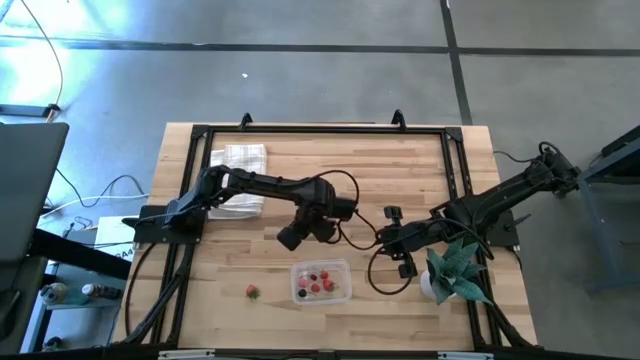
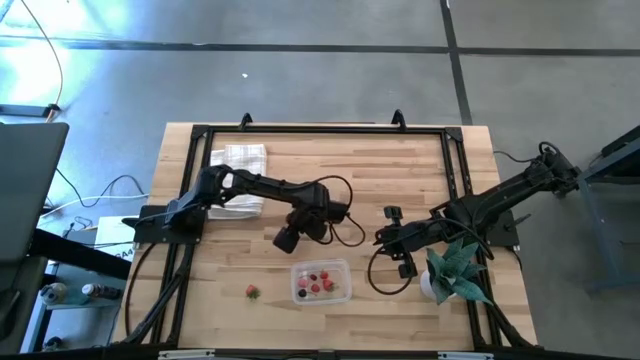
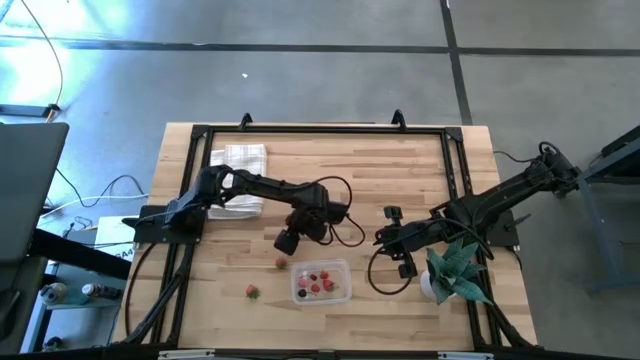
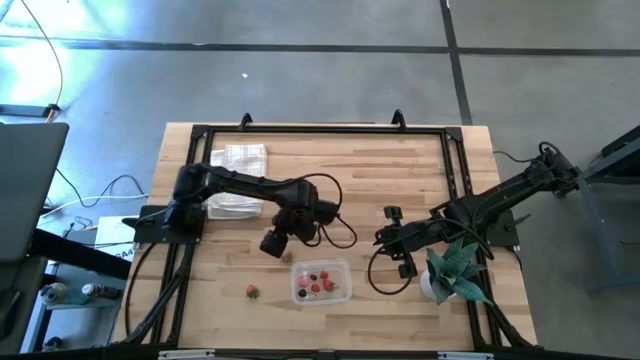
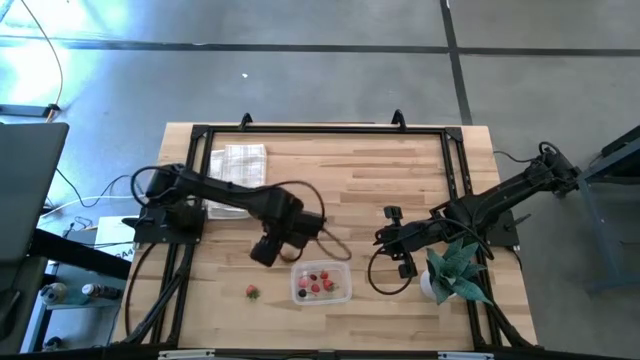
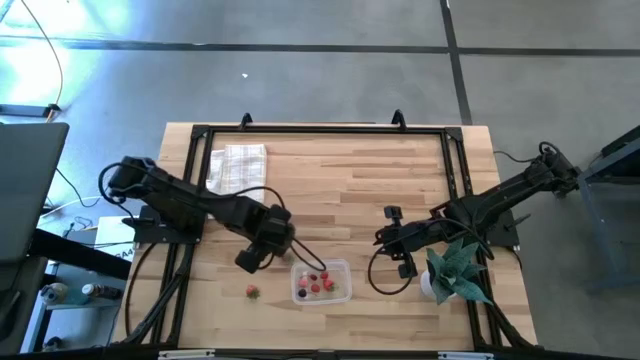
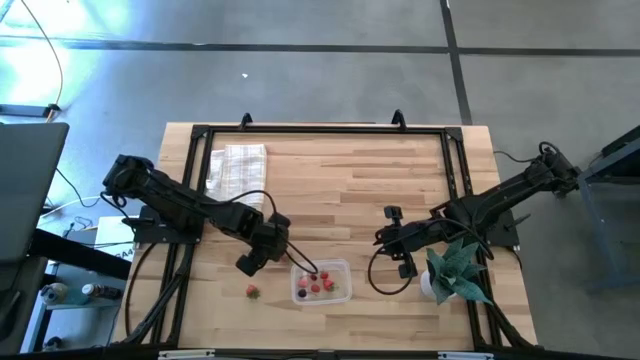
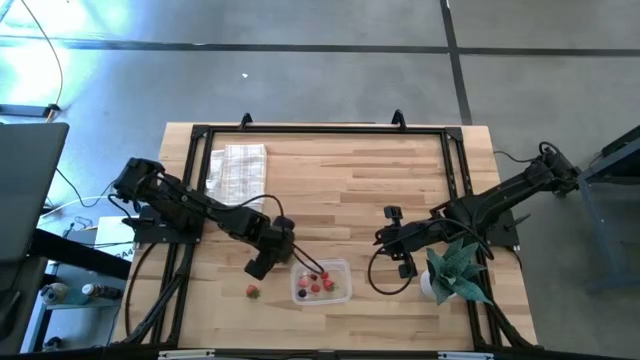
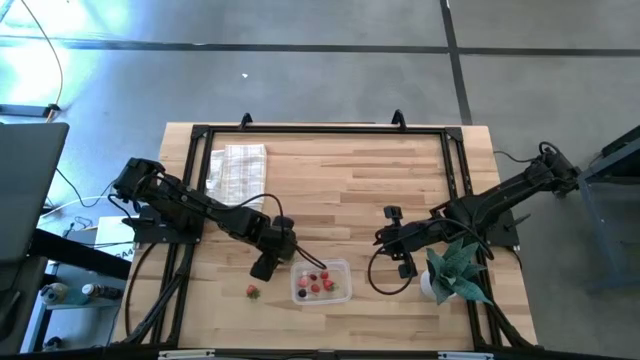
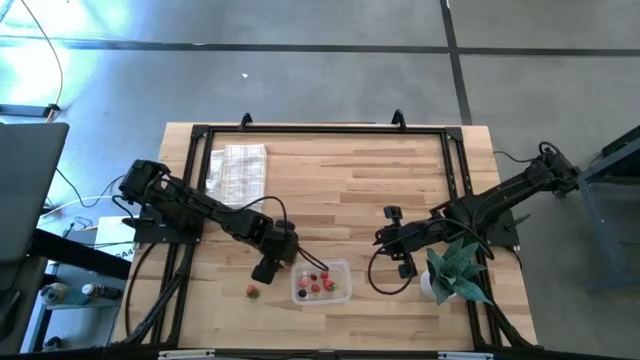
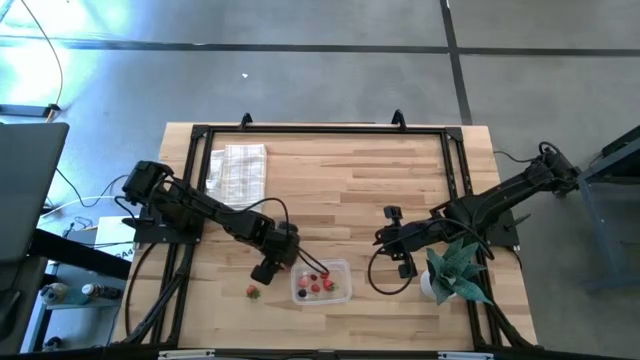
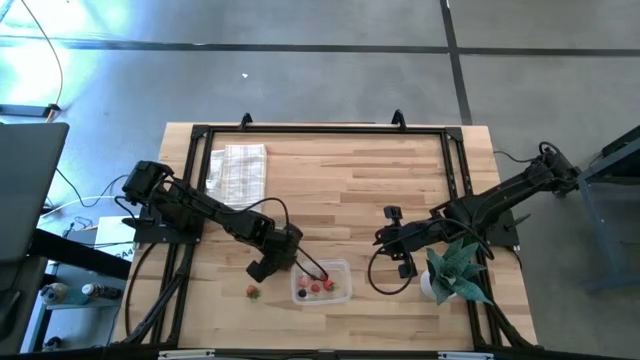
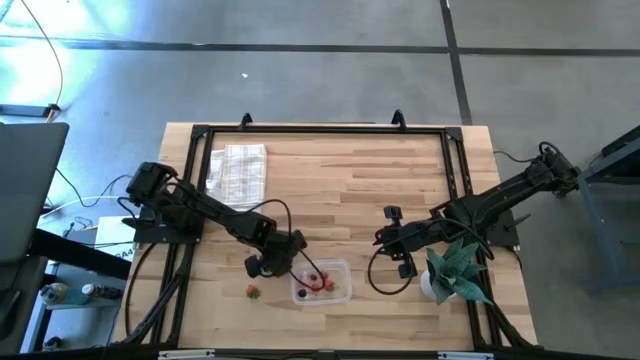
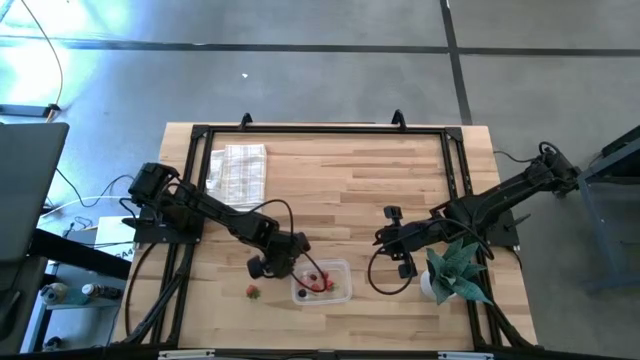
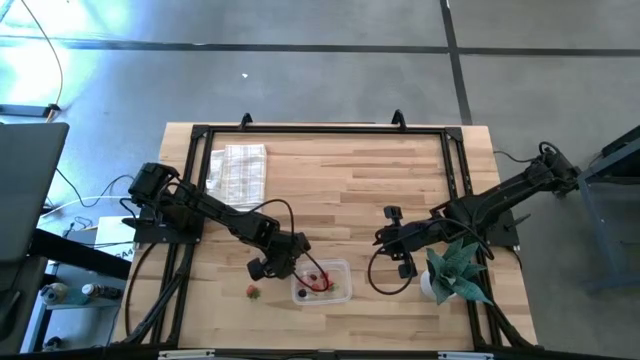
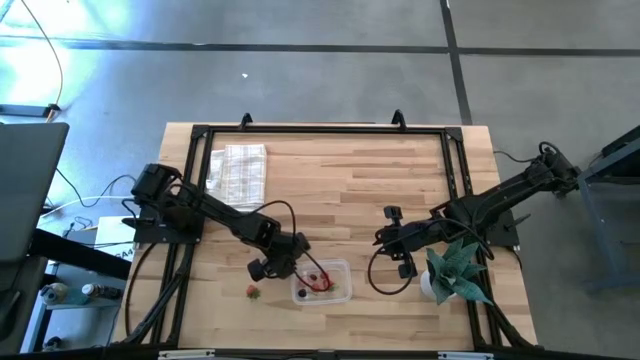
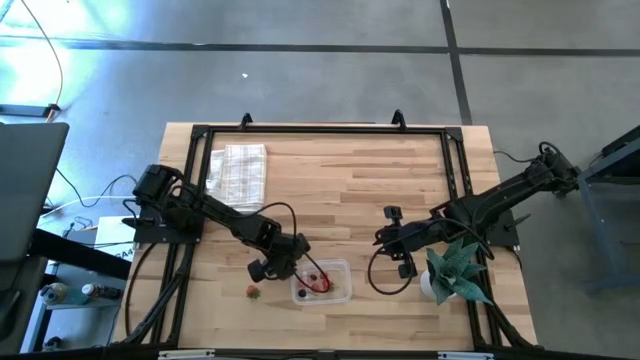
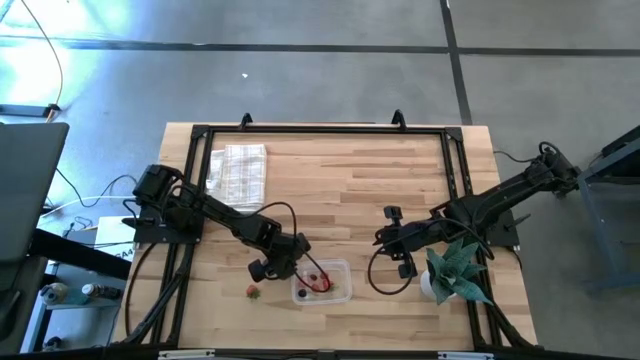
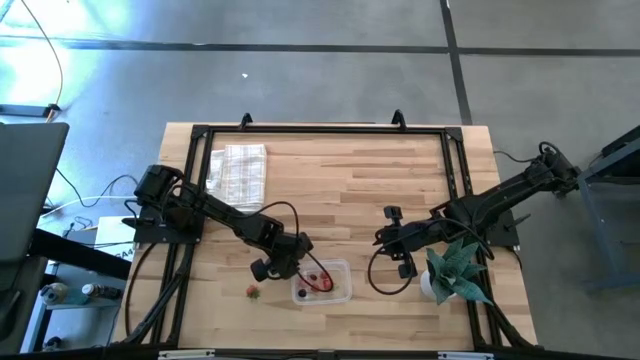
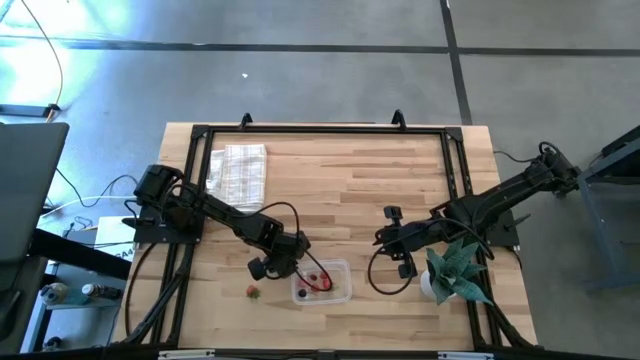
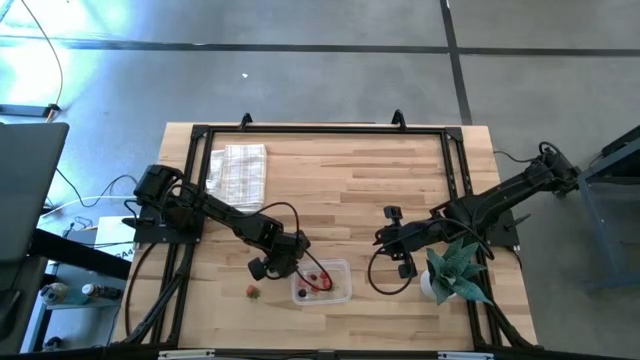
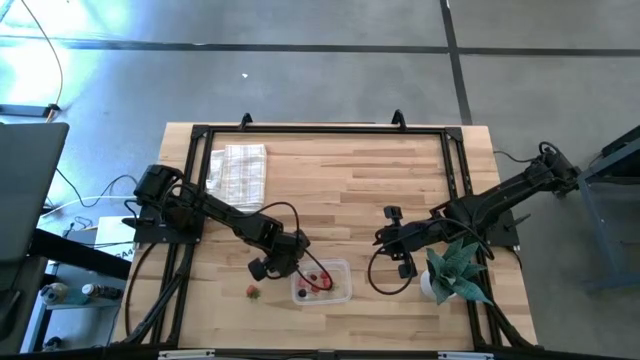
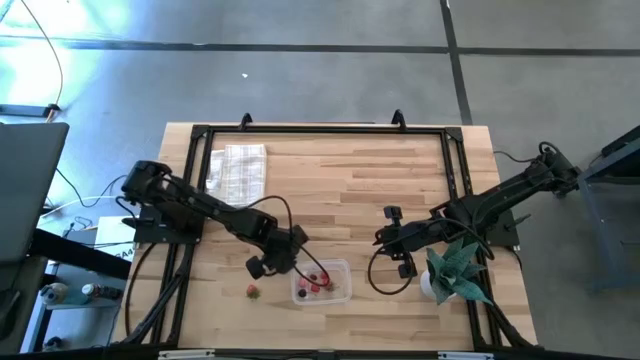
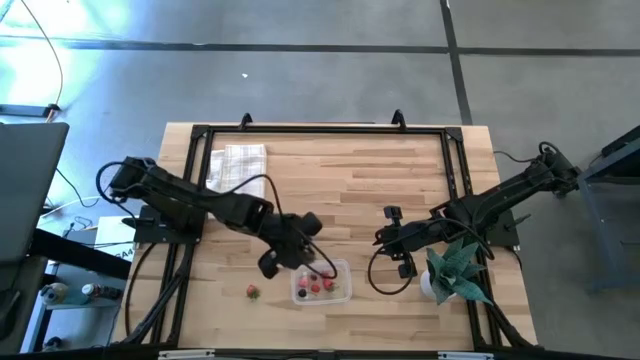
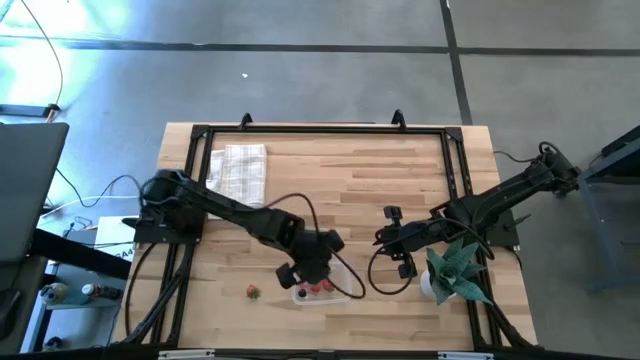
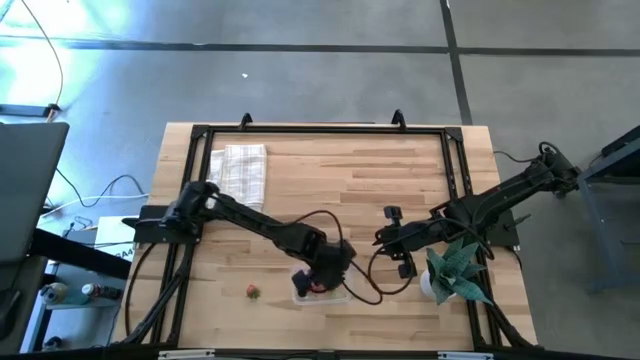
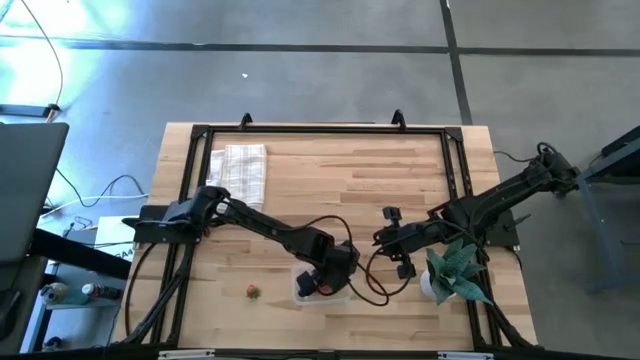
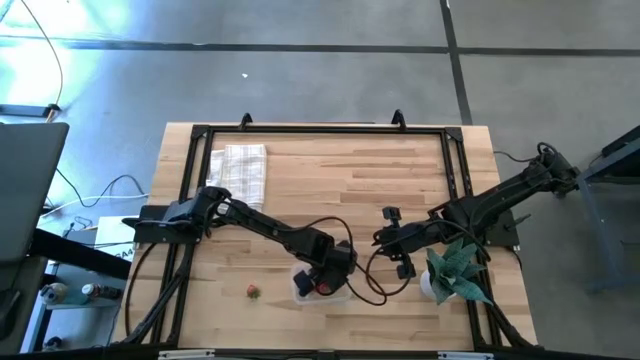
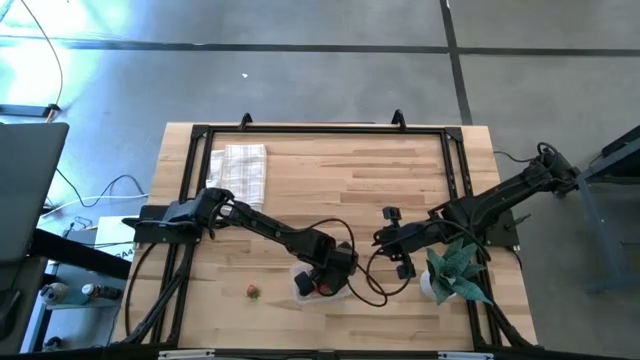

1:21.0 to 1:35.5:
Task: Pick and placing Produce into tupperware
Put the red strawberry into the transparent bin

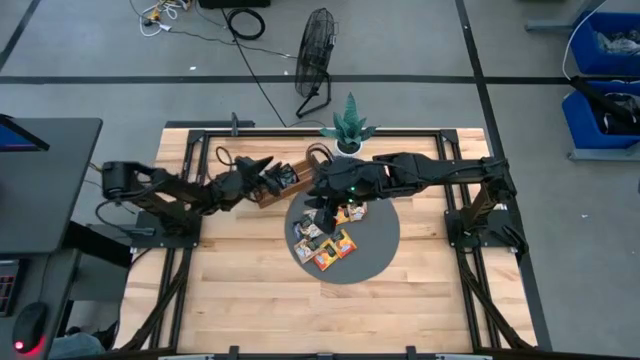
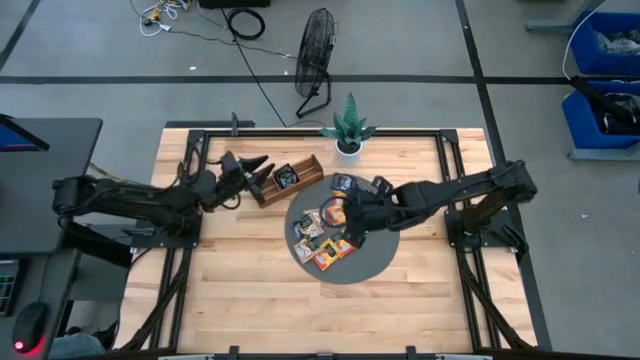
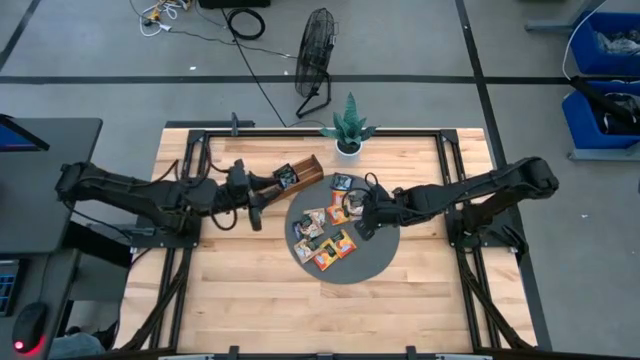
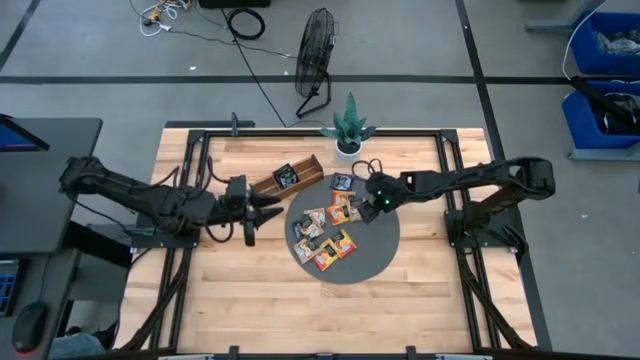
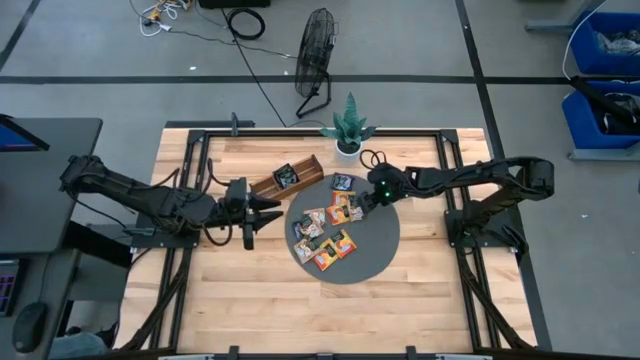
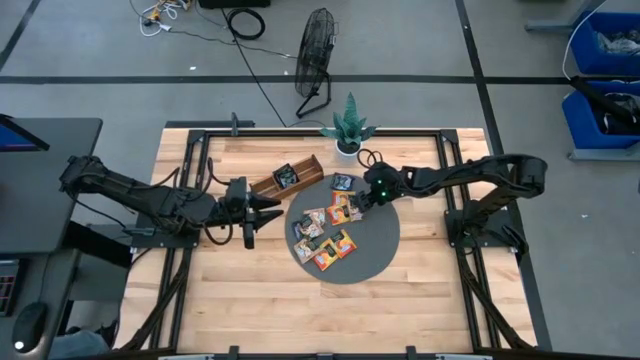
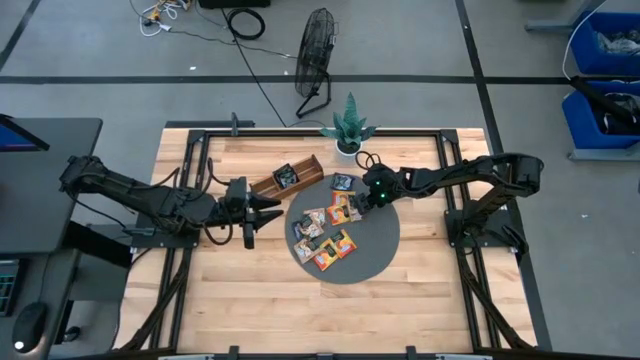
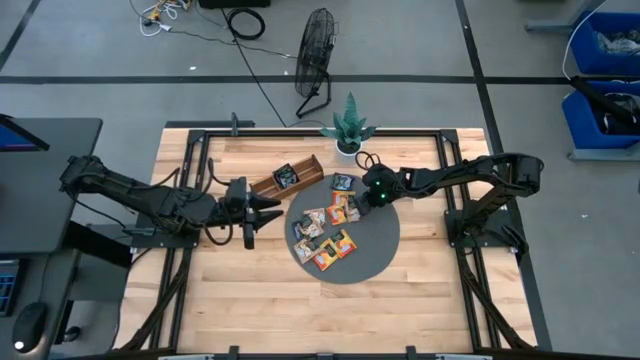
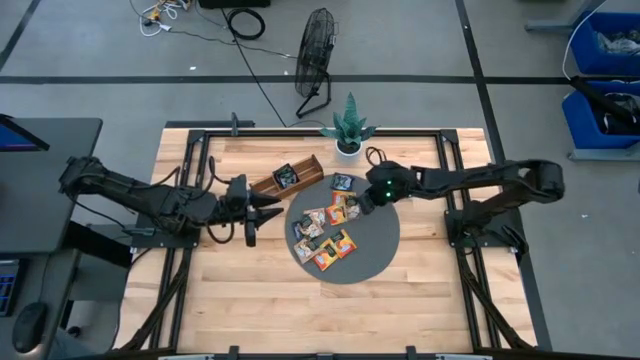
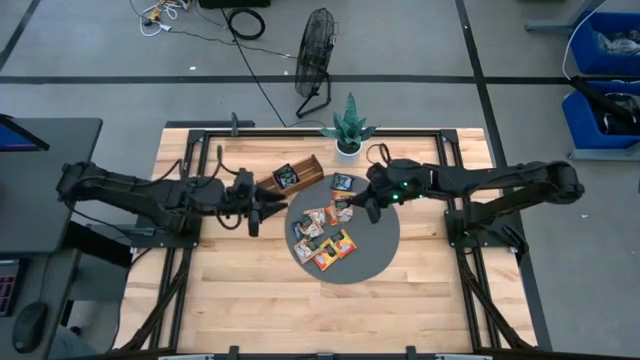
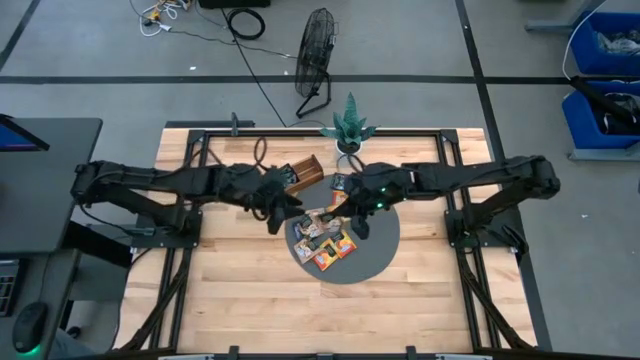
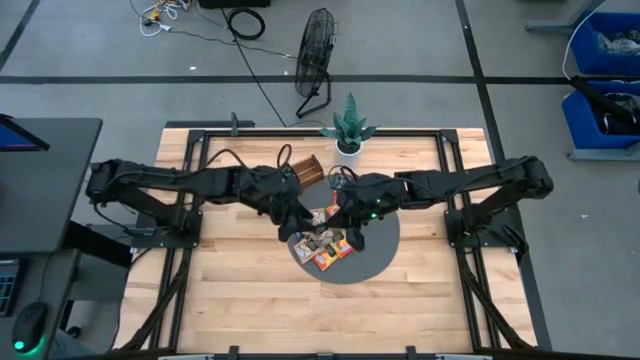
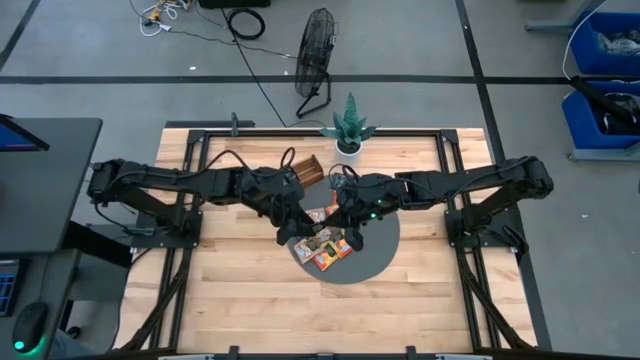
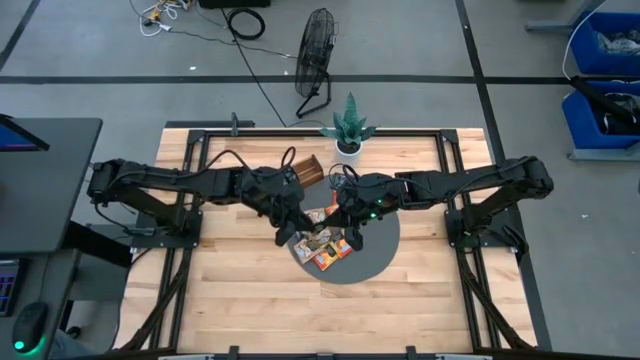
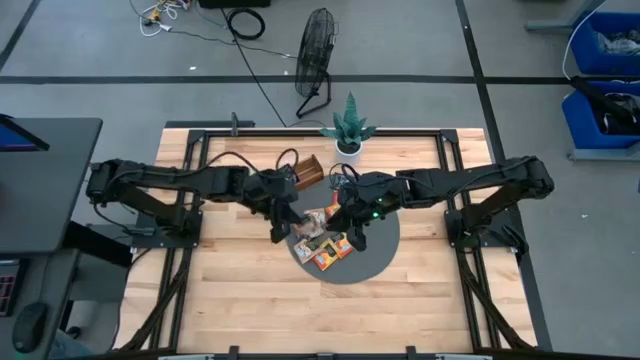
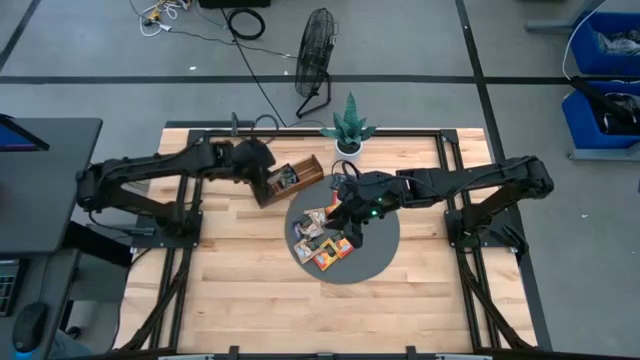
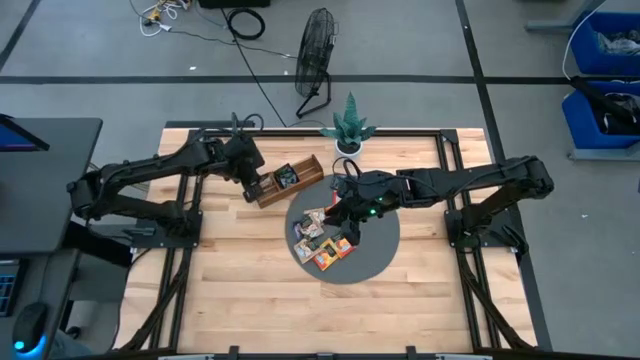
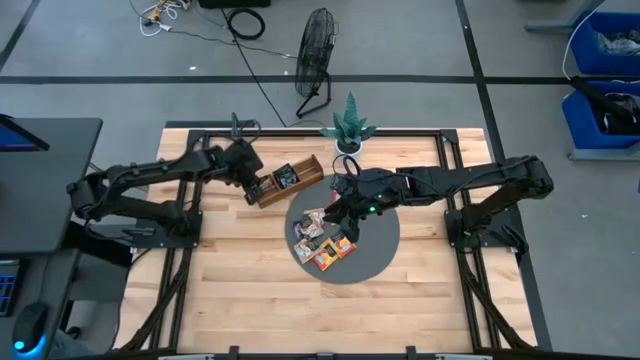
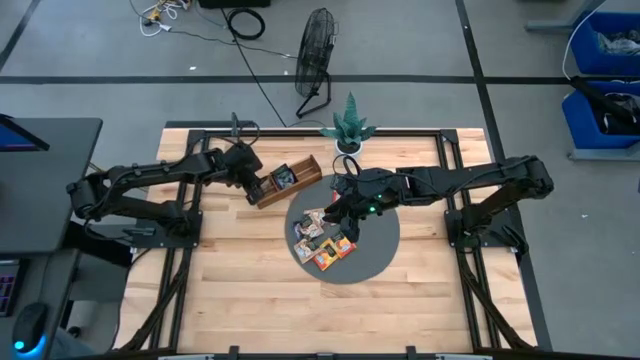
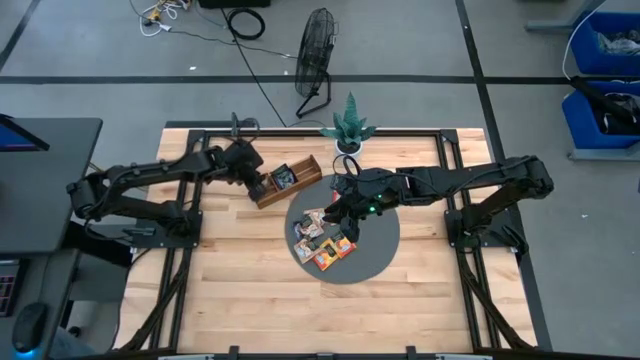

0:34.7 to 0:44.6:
Task: Pick & Place Tea
Put the brown tea bag into the left section of the wooden organizer
